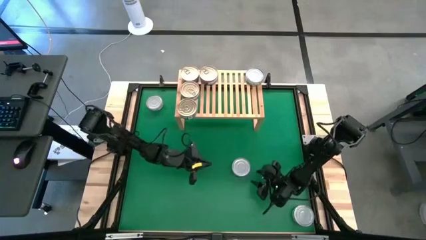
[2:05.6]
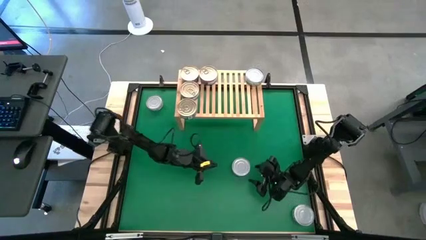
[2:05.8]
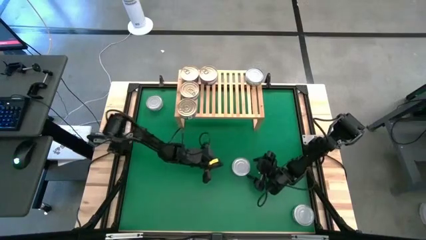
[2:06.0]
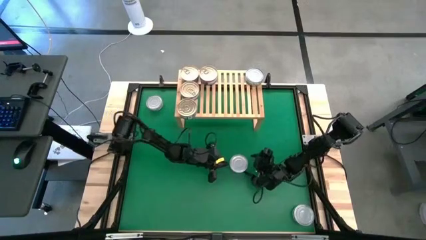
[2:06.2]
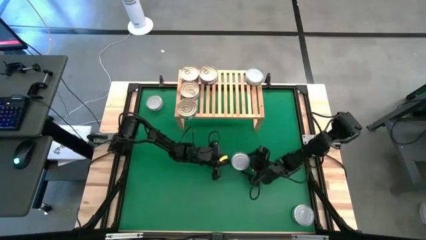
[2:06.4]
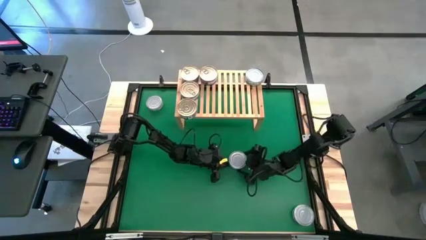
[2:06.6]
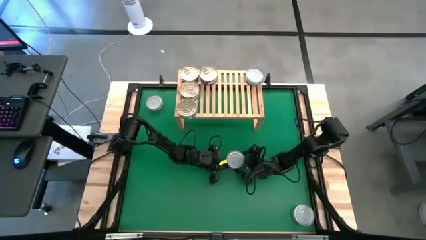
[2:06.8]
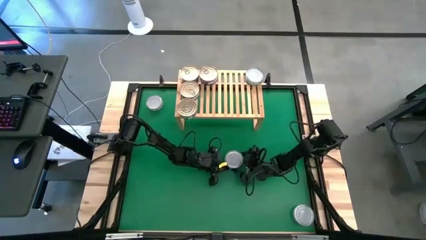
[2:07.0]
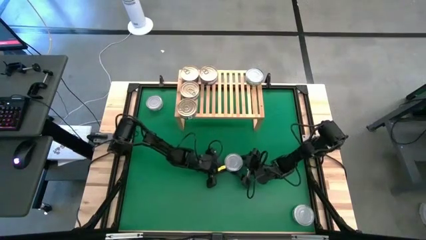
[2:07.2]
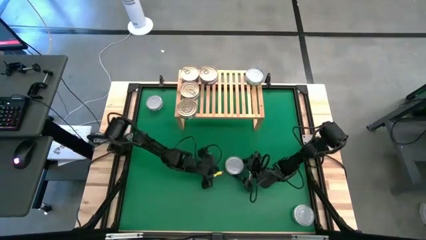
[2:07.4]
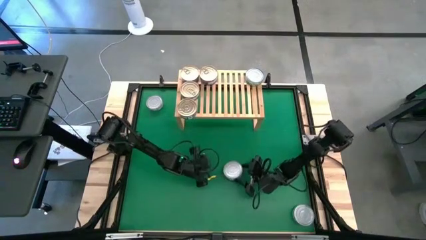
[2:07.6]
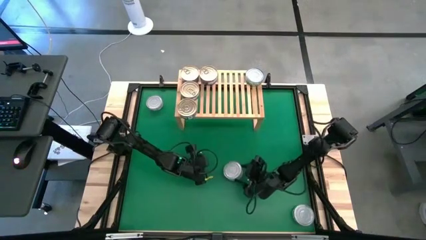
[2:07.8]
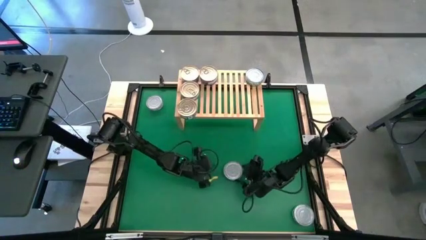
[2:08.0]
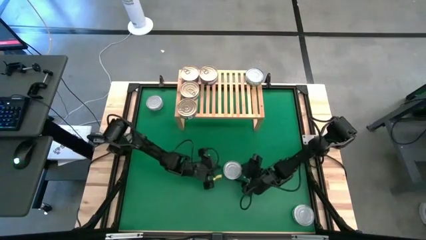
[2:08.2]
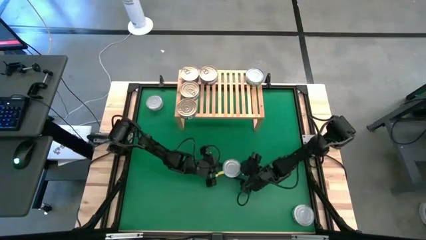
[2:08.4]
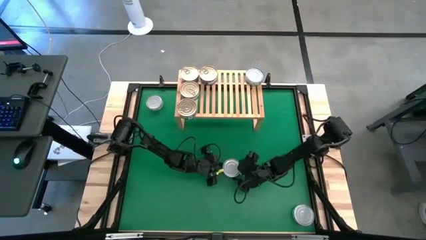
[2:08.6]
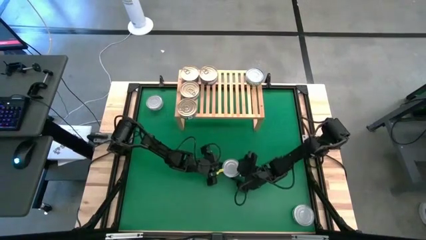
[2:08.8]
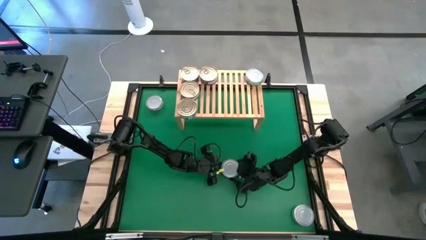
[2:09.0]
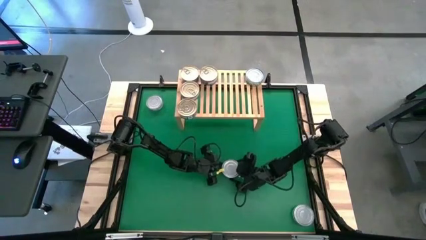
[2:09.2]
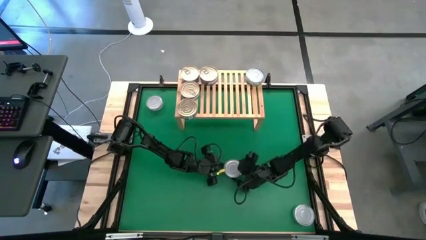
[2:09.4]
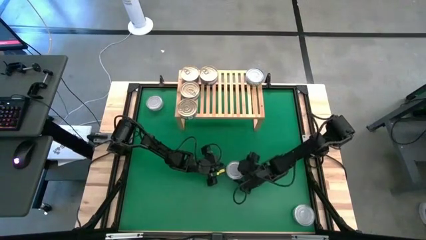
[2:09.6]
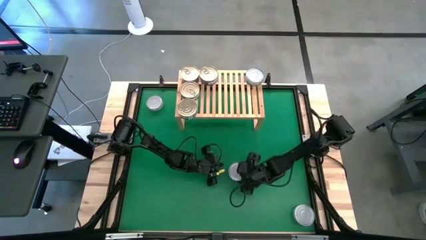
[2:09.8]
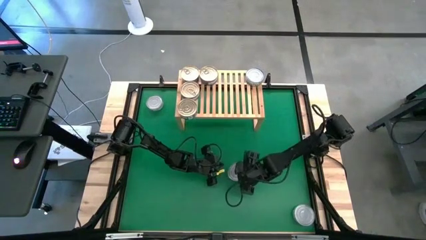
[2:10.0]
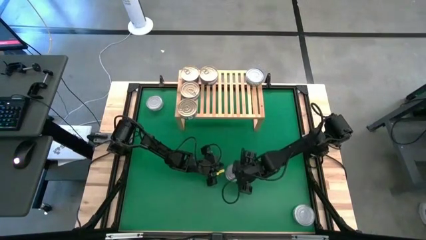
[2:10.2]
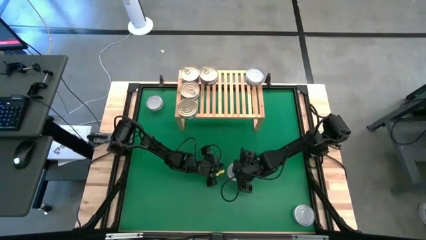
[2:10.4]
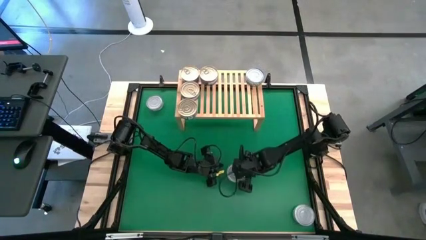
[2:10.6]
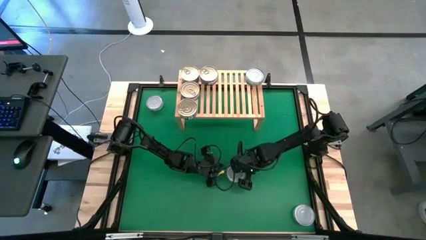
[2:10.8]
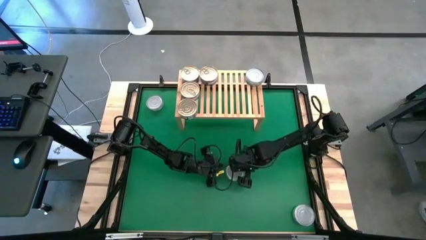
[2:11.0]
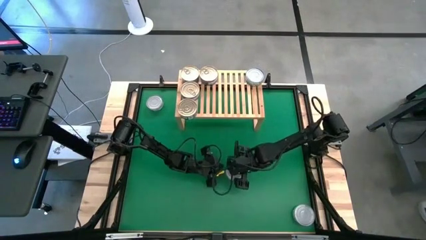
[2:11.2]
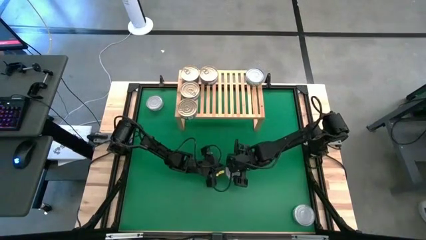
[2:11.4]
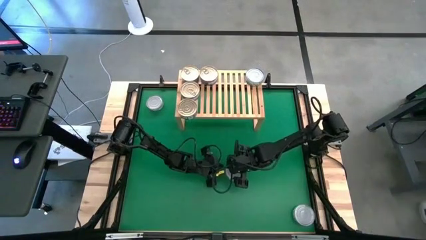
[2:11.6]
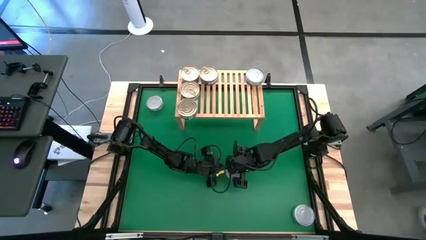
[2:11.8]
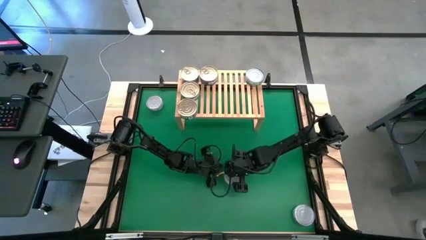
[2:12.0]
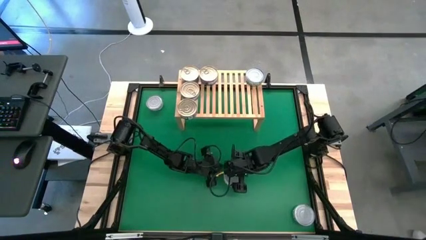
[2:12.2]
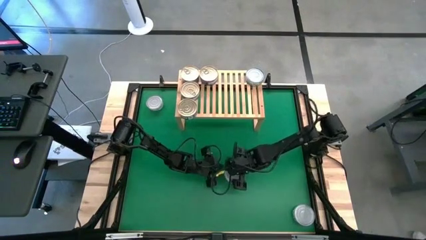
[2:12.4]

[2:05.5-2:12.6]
Task: Stack canned seafood by type on shelf
Stack the center green tuna can on top of the green tuna can on the shelf

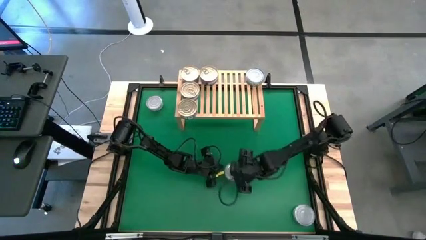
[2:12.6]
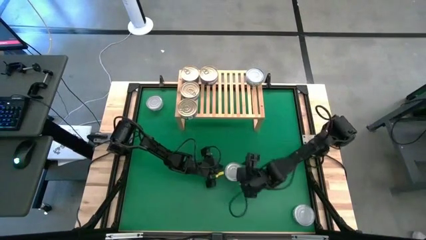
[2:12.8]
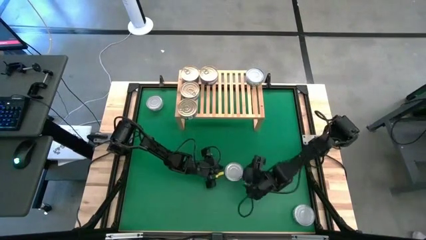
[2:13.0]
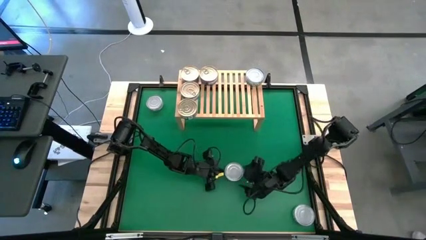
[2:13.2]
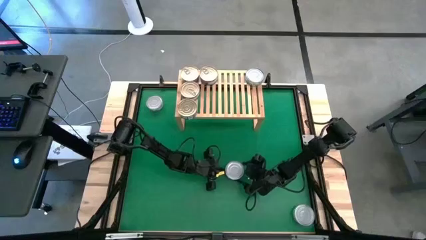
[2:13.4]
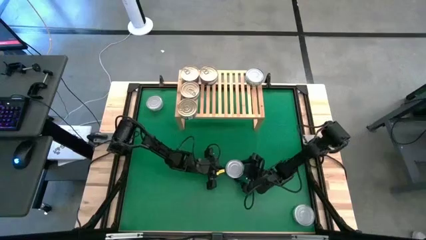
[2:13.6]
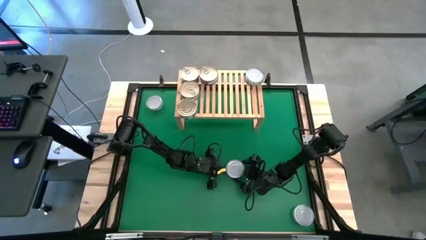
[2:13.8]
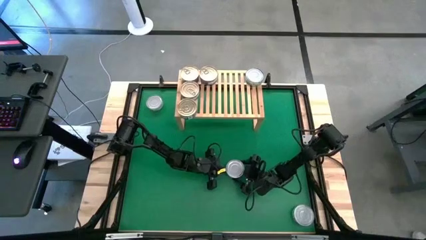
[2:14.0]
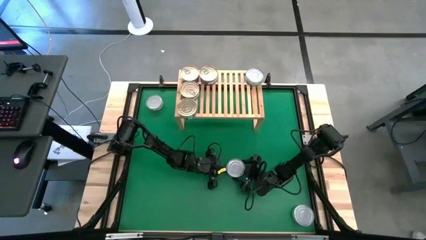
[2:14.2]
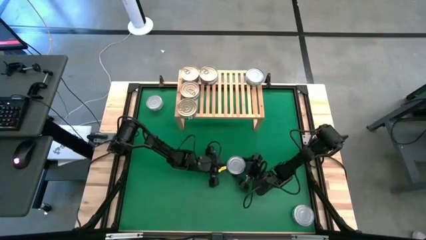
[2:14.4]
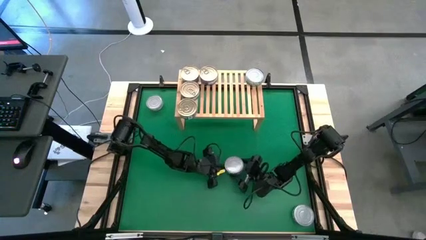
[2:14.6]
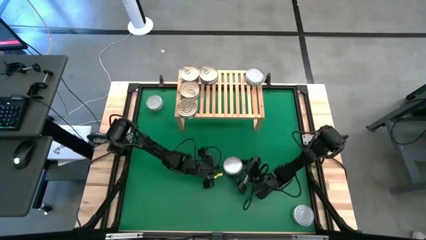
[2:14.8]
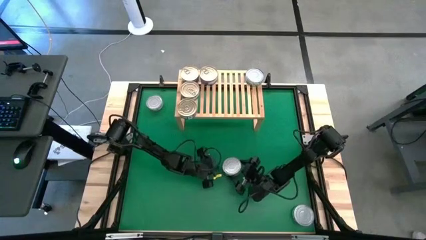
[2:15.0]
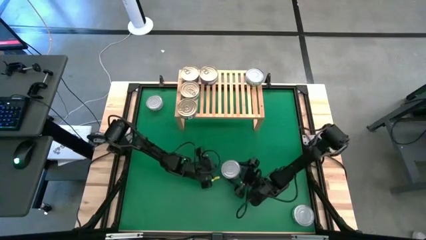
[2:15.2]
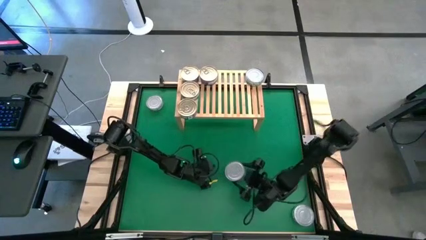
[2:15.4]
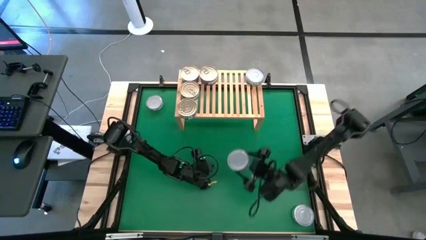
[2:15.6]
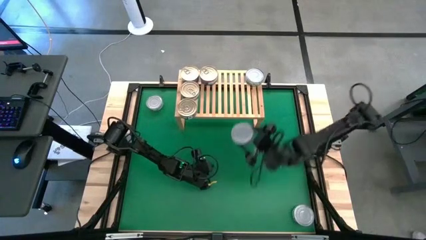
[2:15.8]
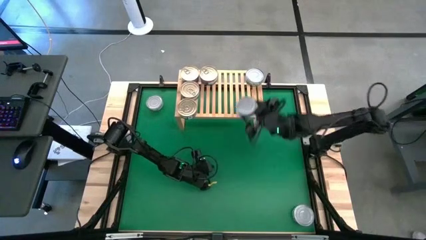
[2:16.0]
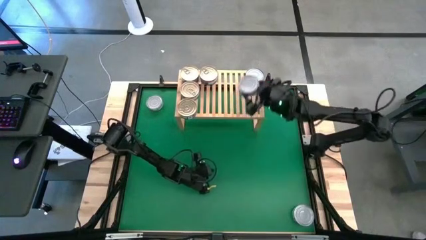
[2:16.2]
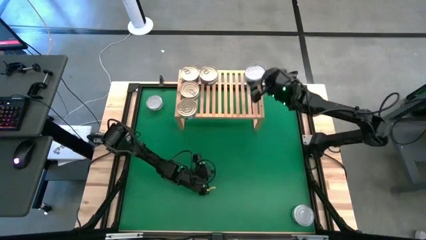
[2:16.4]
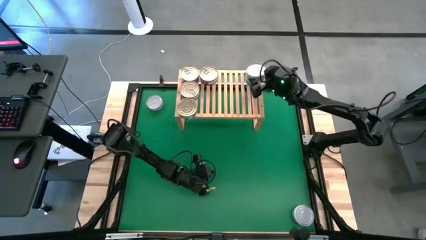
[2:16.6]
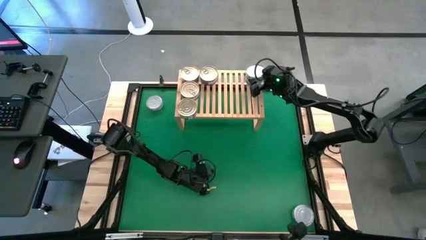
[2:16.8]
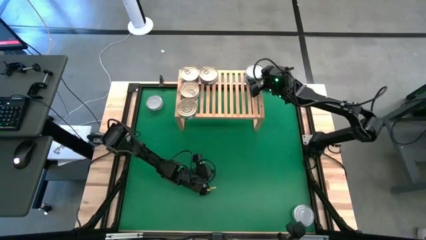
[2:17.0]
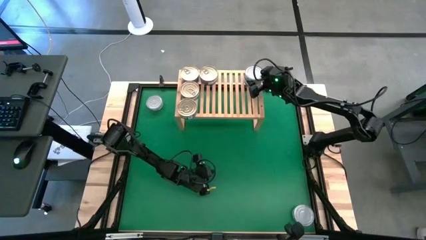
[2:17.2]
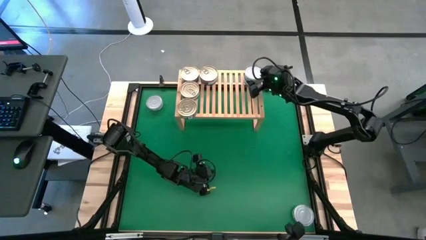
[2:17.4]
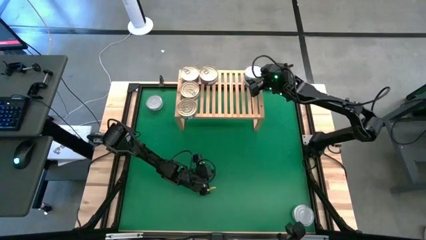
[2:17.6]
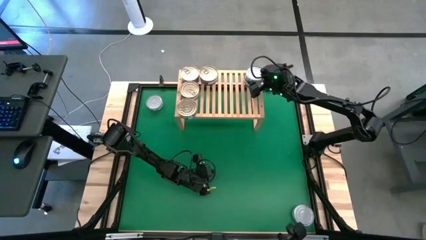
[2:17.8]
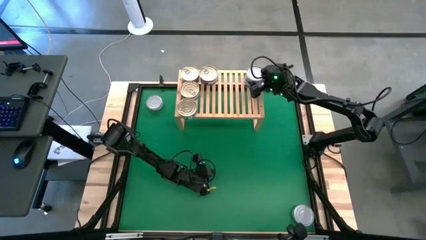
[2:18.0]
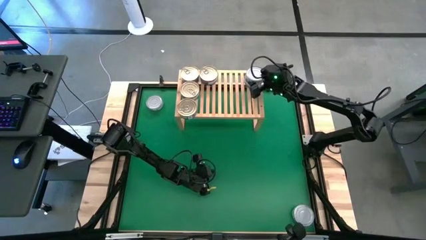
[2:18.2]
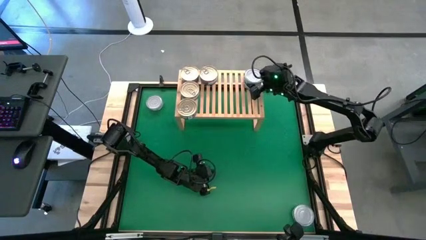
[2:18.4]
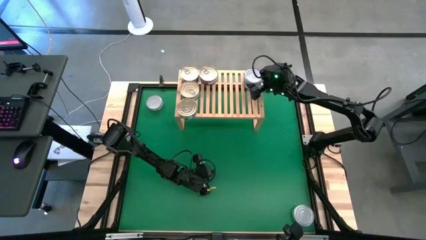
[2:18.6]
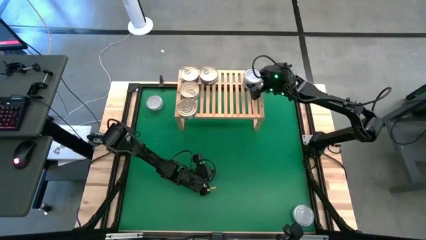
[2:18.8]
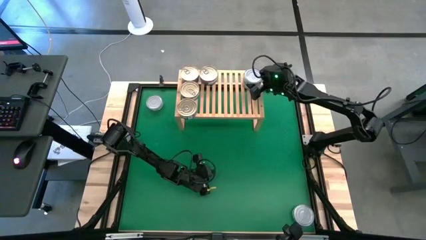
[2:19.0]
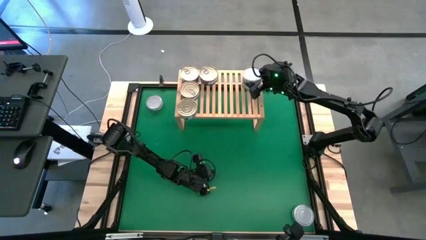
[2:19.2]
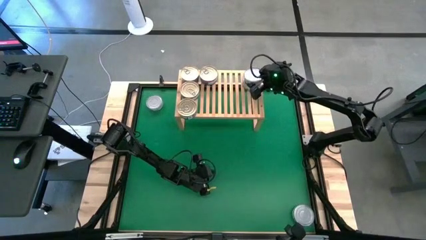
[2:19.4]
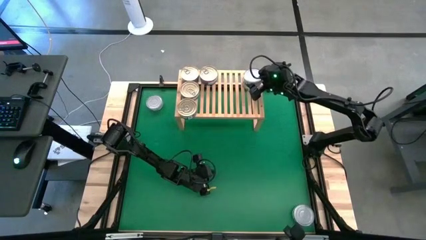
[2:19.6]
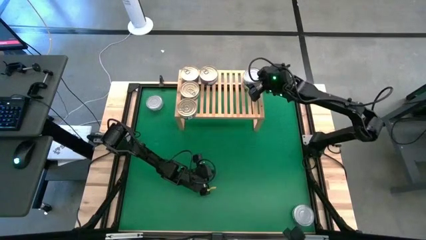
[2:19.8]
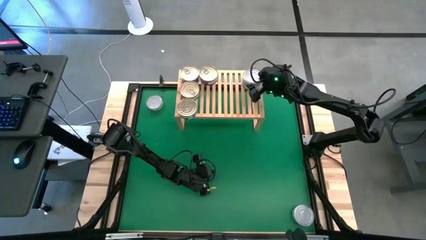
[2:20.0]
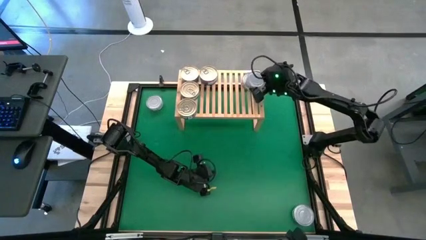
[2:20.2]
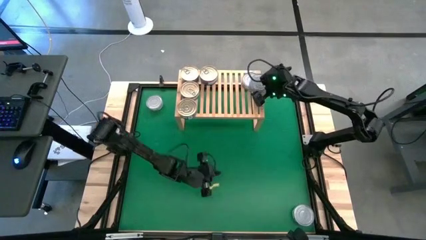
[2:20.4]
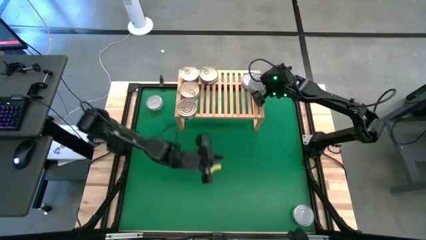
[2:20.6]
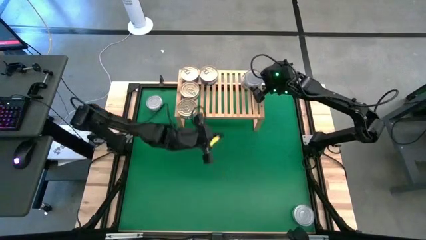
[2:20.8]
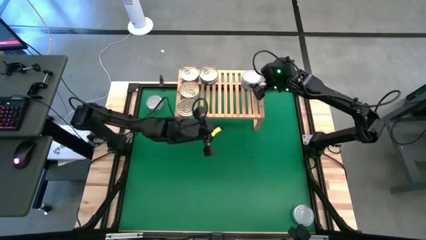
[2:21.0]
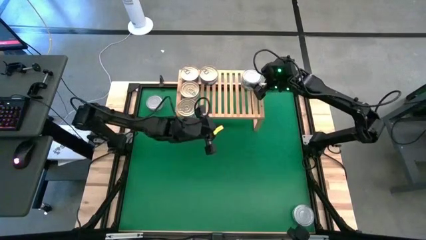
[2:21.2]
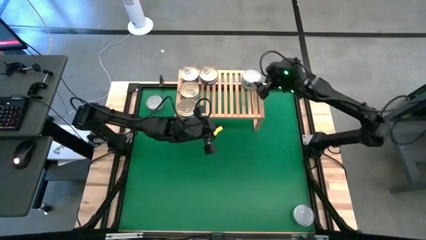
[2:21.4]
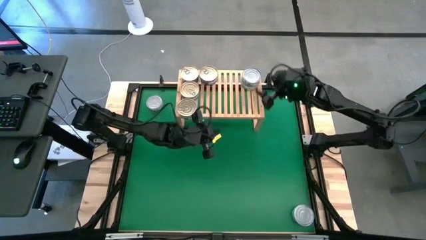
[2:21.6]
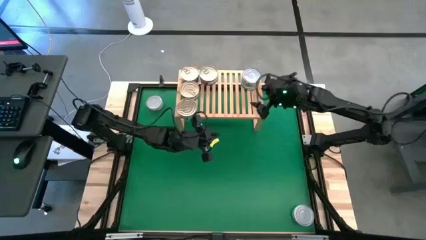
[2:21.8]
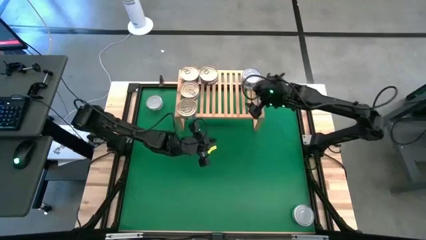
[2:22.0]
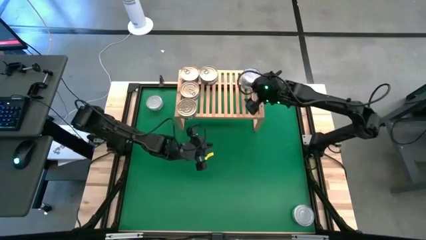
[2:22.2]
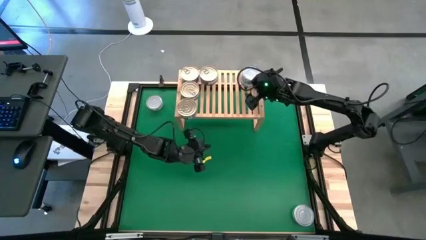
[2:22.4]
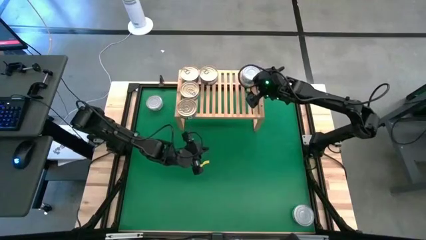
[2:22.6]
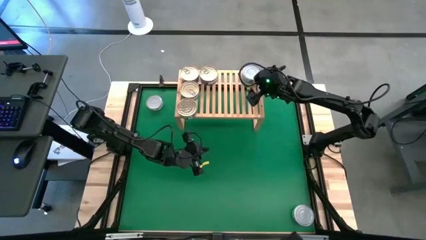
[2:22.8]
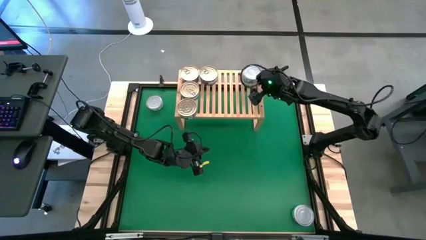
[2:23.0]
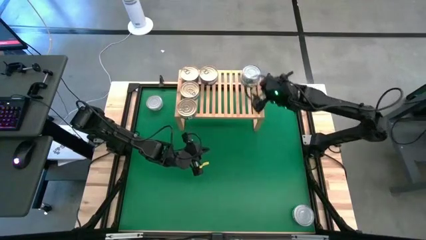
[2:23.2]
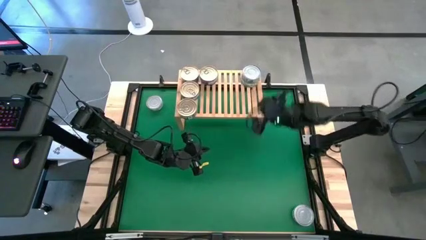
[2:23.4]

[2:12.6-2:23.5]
Stack the center green tuna can on top of the green tuna can on the shelf
